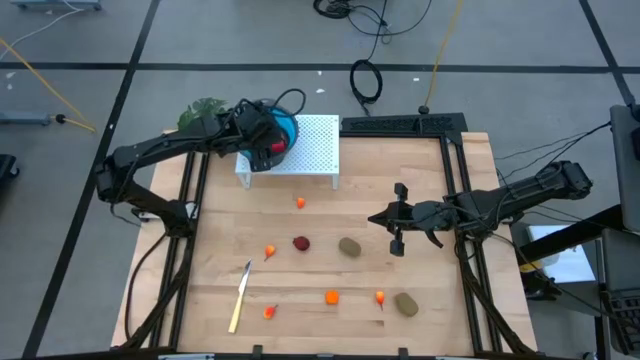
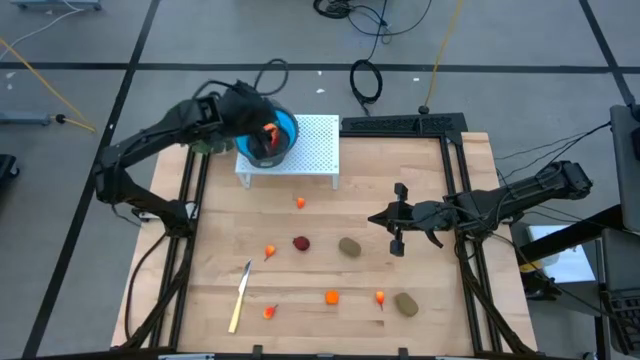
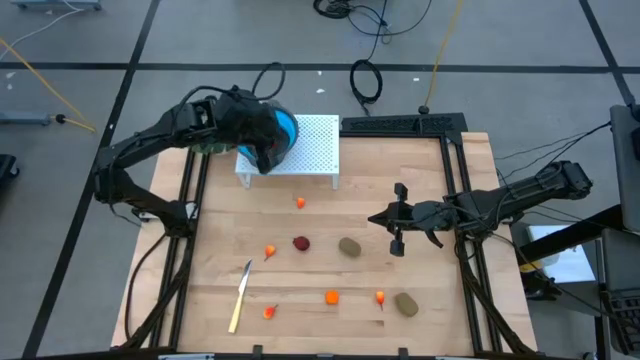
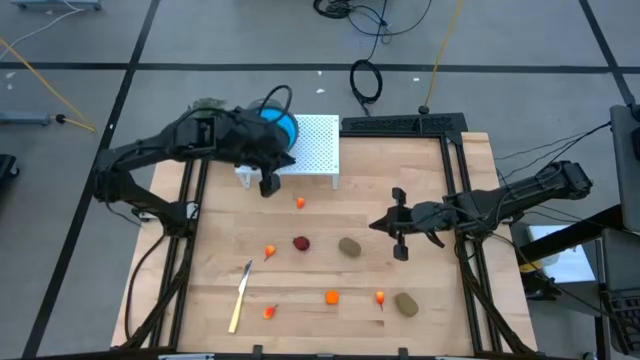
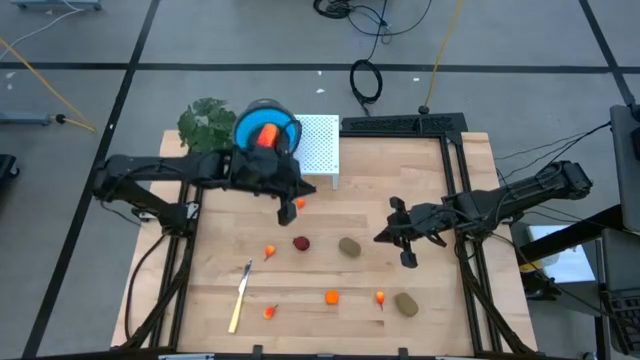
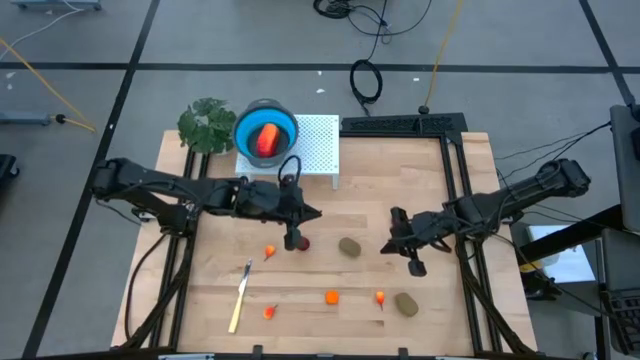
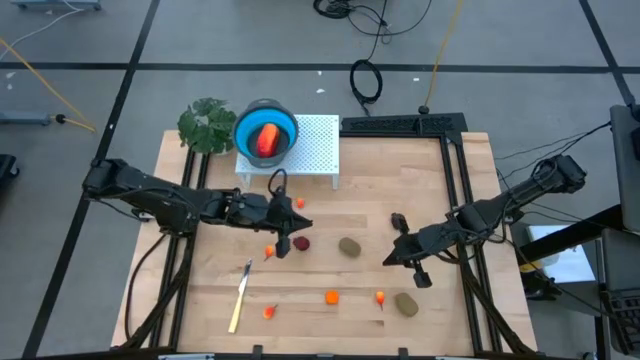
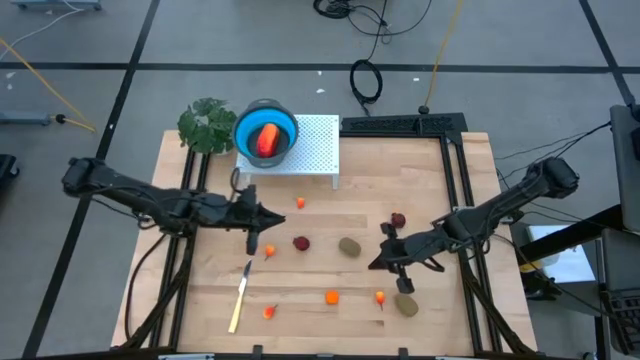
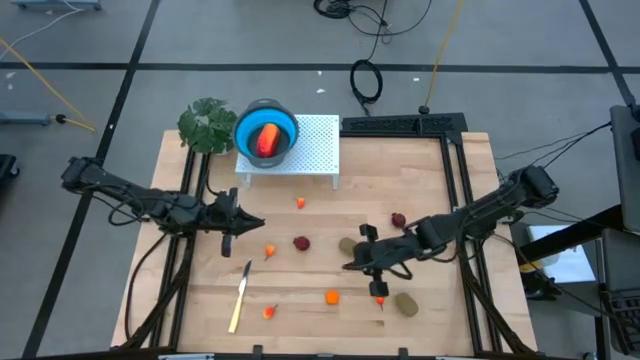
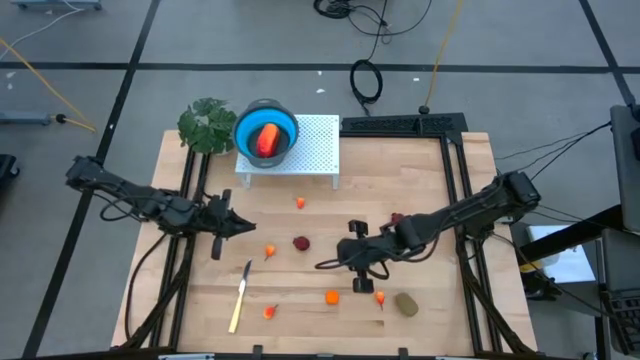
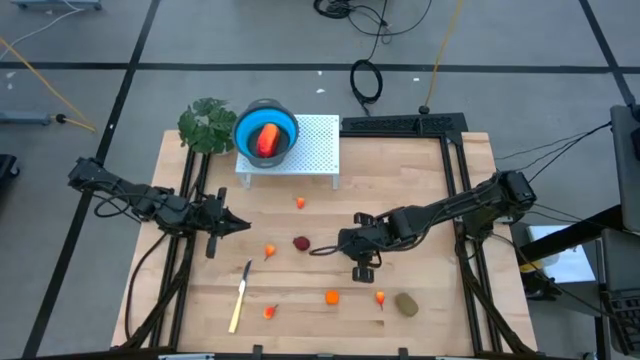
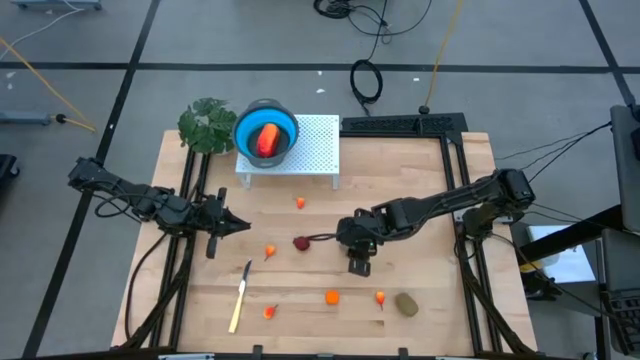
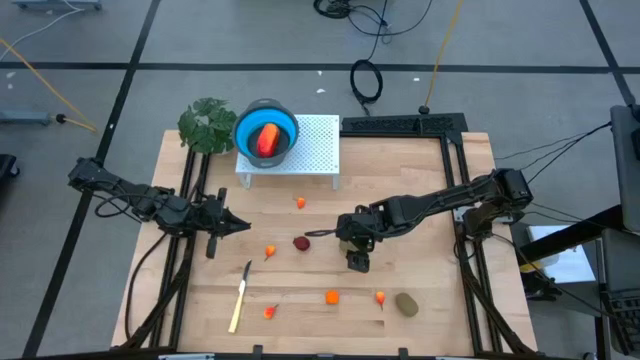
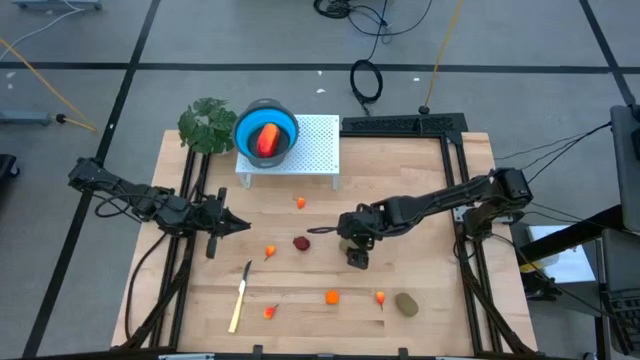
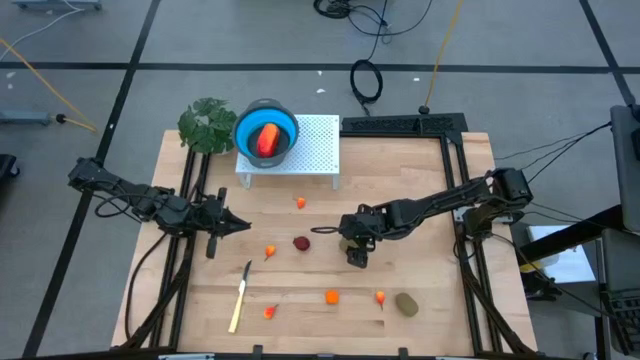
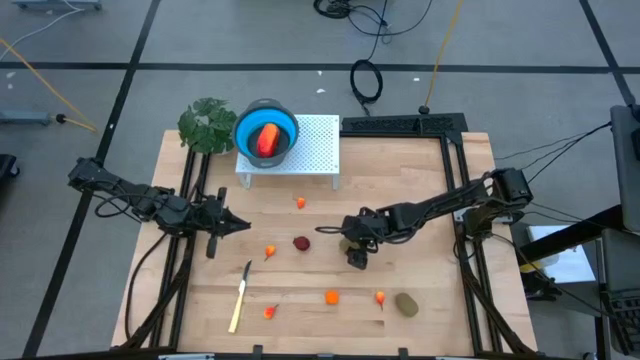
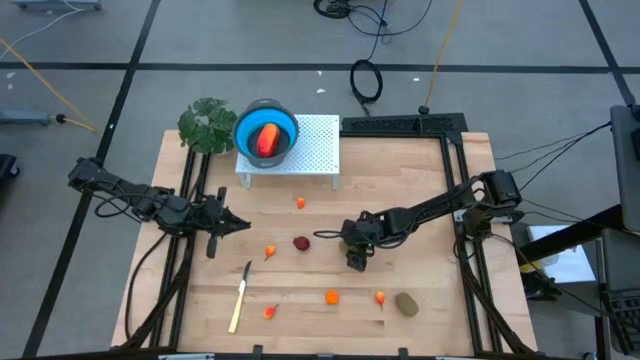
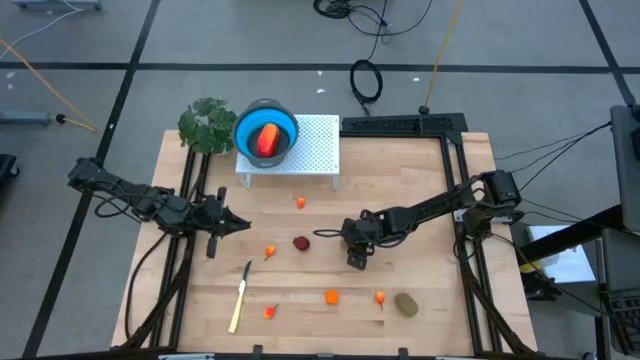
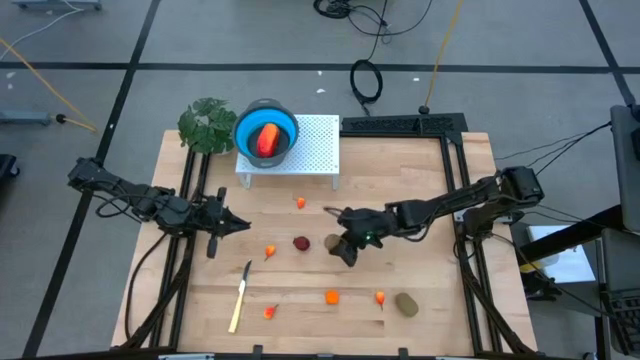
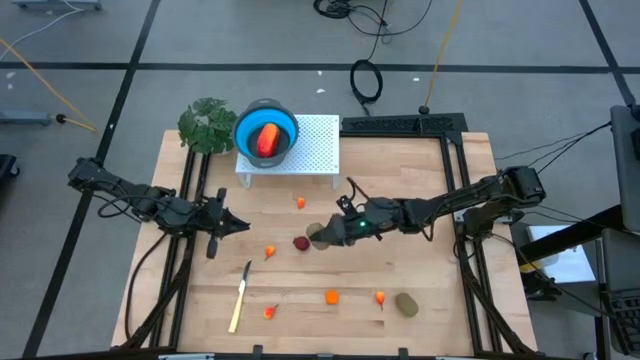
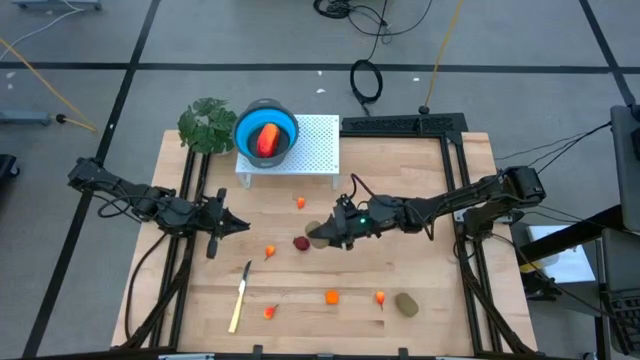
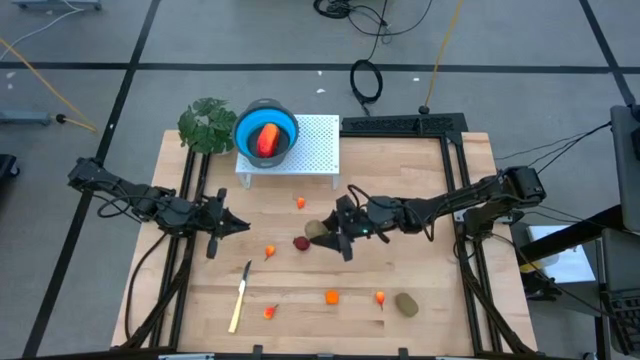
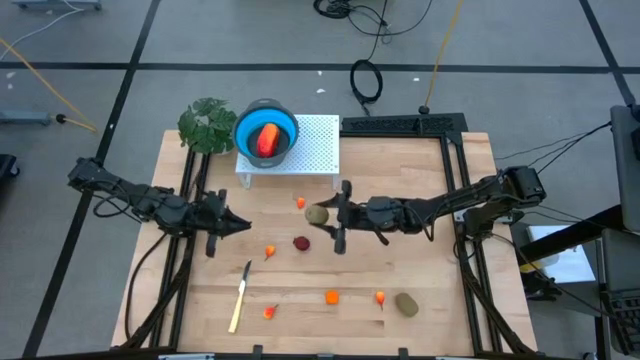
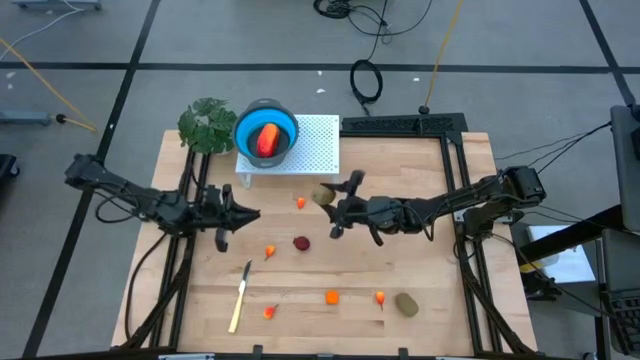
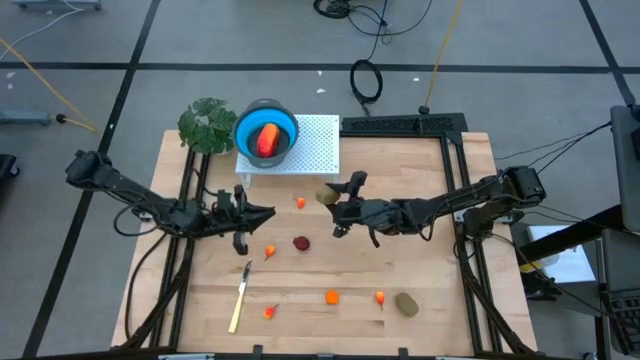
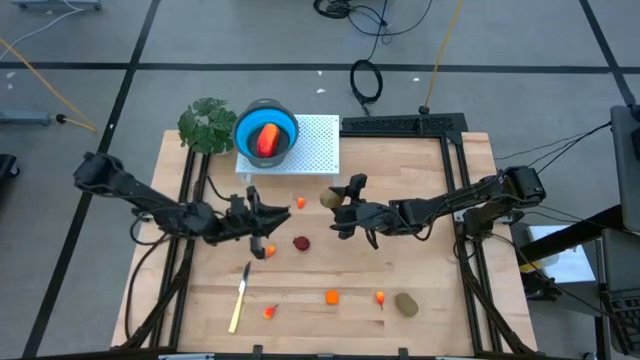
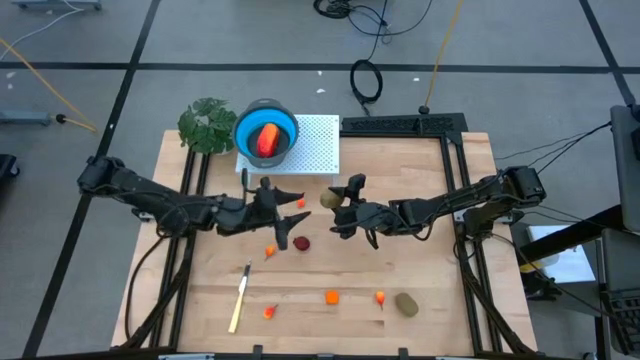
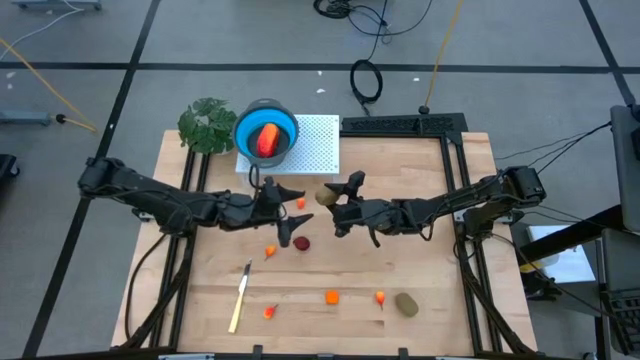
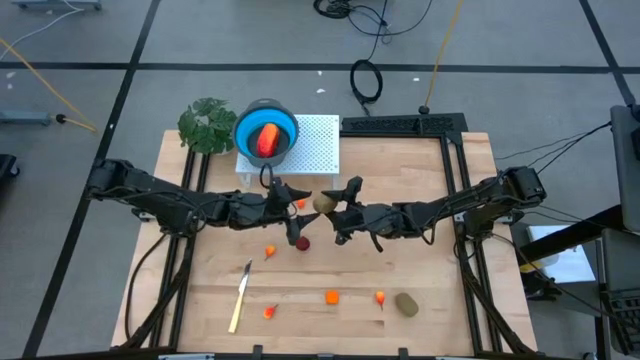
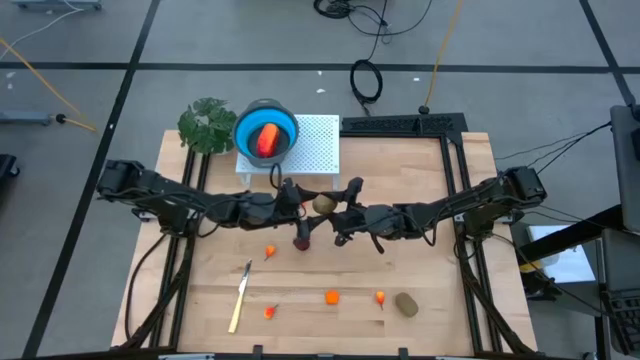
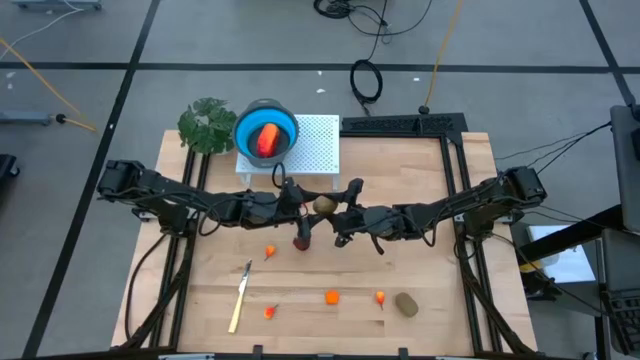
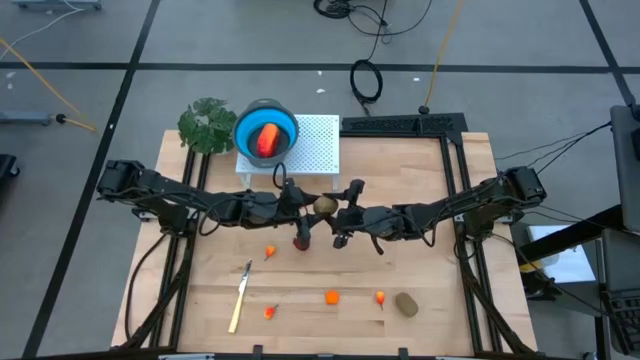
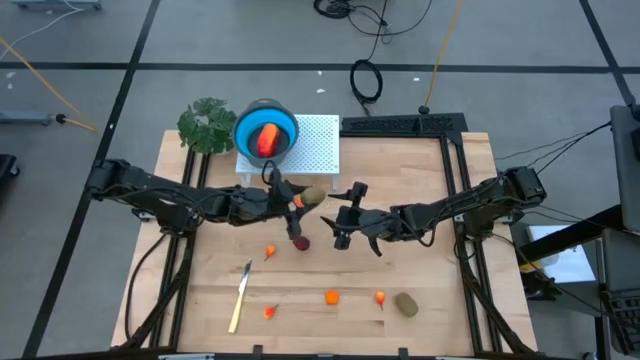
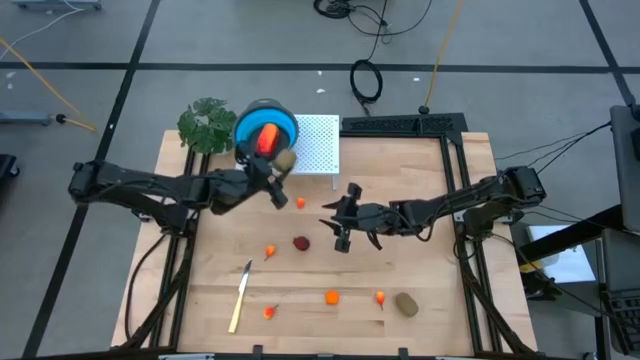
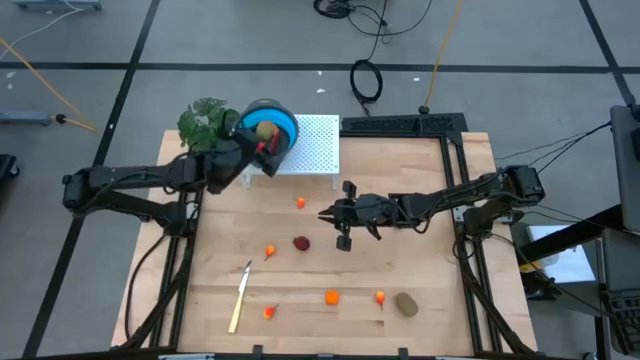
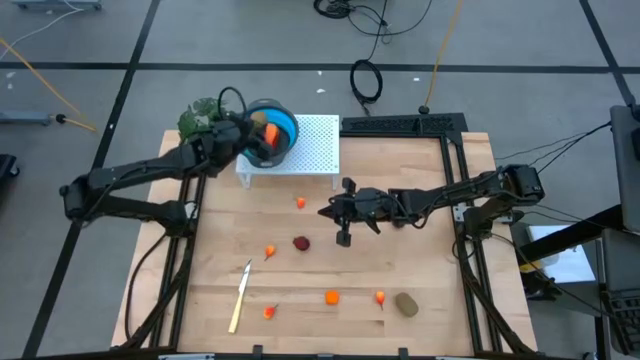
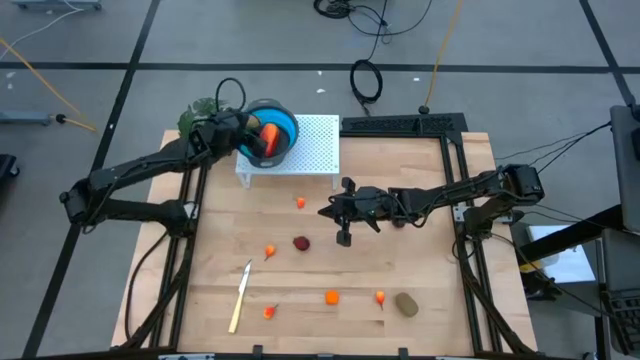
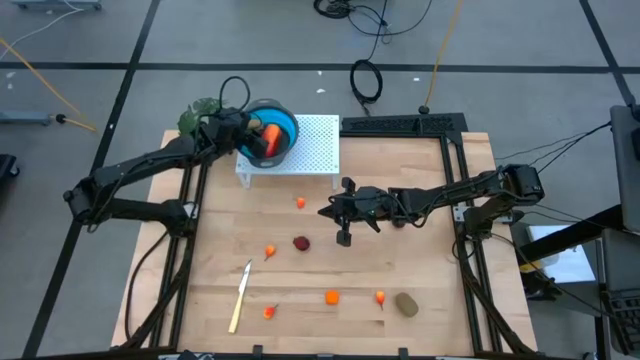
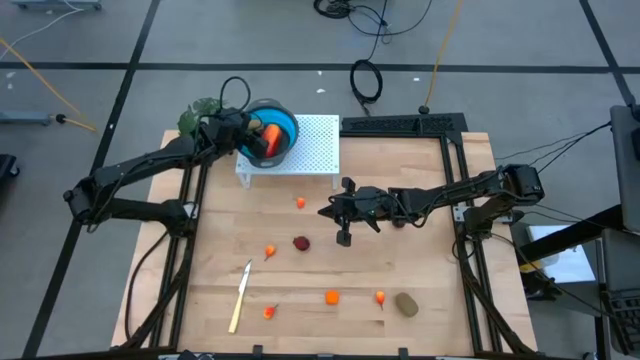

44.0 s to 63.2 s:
Task: Pick & Place Fruit
Put the top kiwi into the blue strainer bowl on the shelf

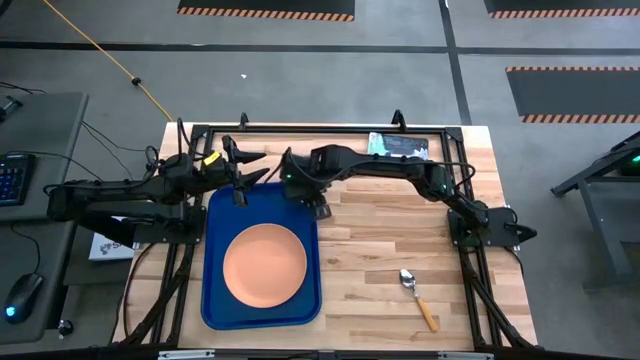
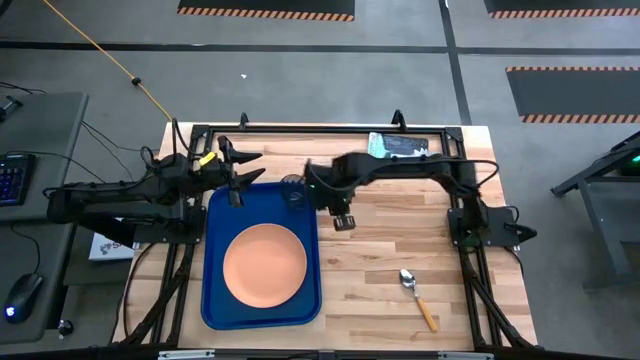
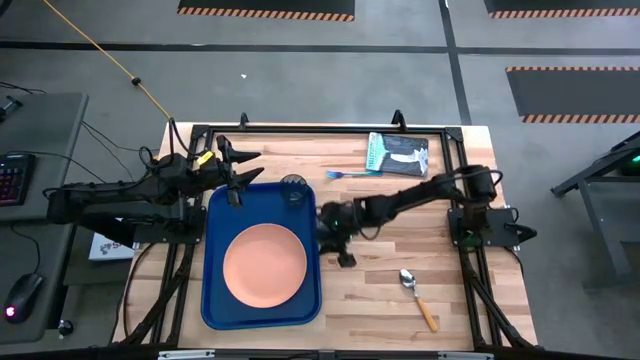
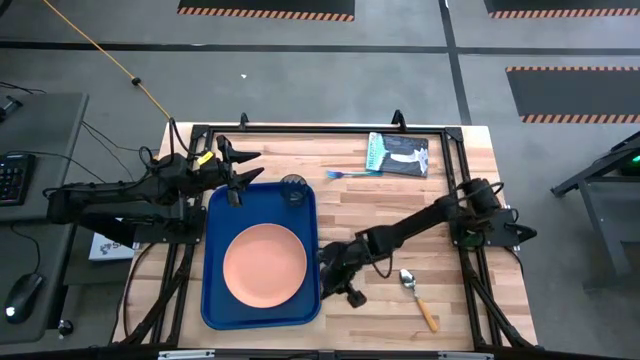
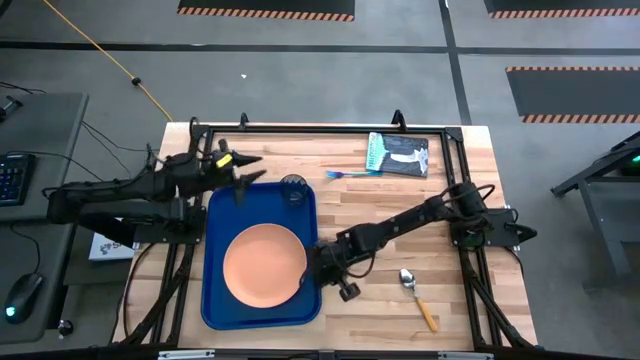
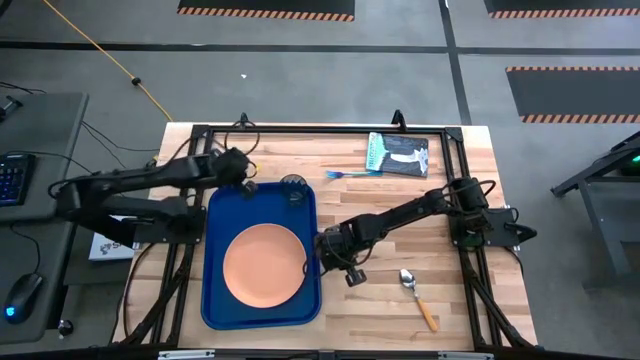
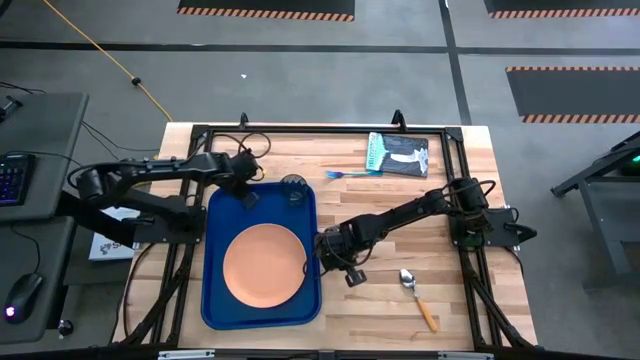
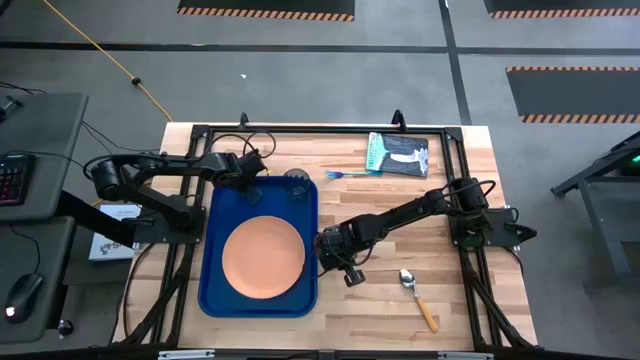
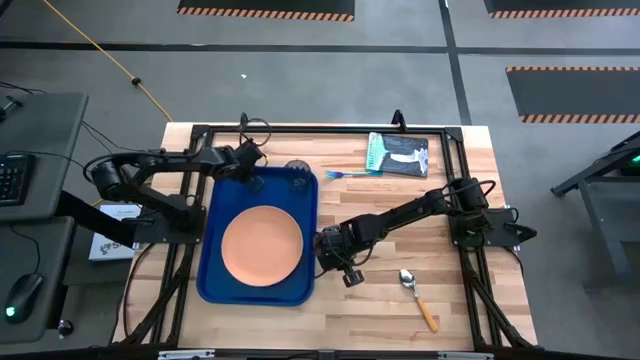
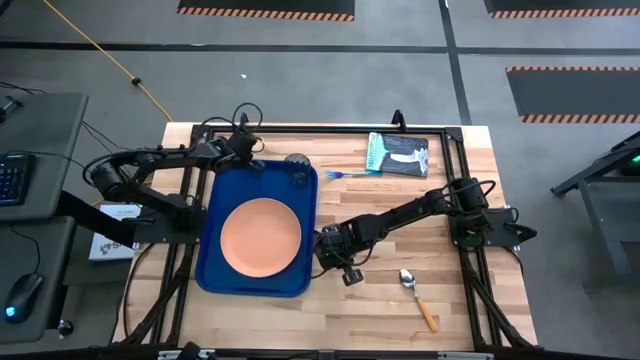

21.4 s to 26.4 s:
Task: Pick and place plate/cup/fork/spoon on tray
Adjust the blue tray
